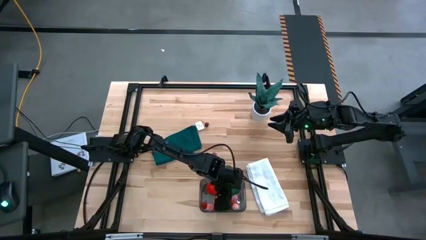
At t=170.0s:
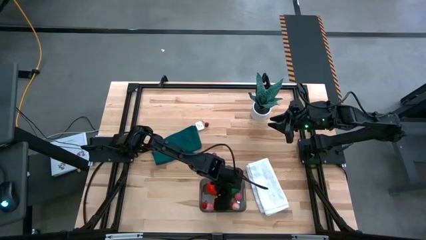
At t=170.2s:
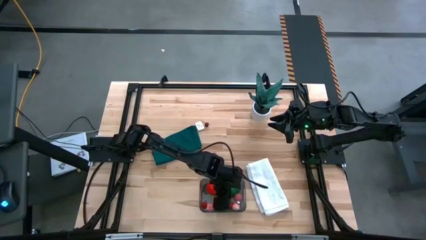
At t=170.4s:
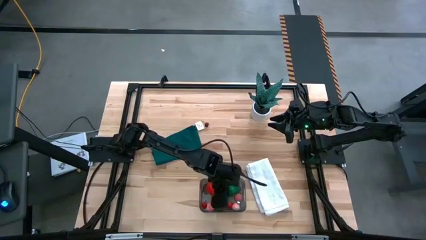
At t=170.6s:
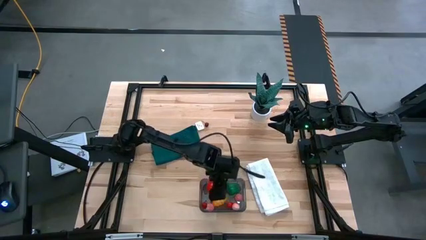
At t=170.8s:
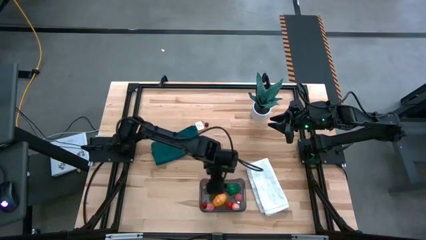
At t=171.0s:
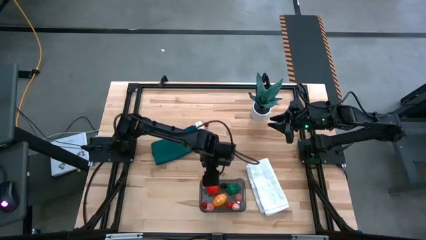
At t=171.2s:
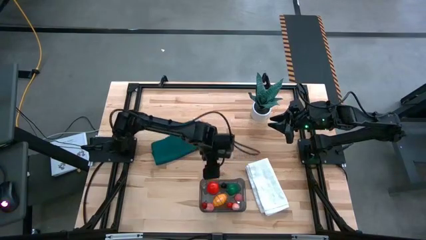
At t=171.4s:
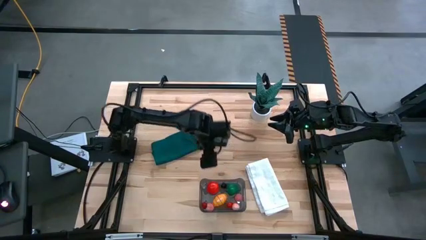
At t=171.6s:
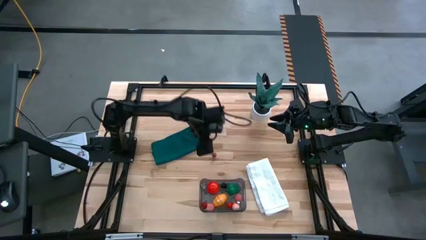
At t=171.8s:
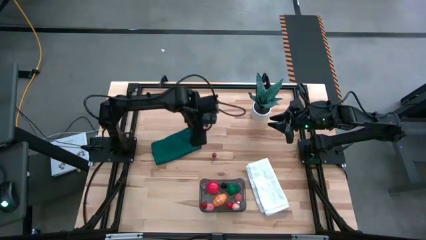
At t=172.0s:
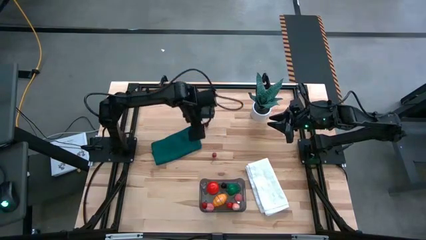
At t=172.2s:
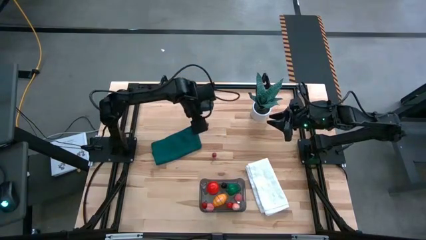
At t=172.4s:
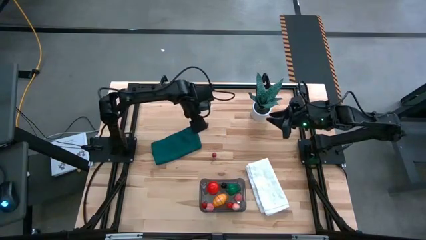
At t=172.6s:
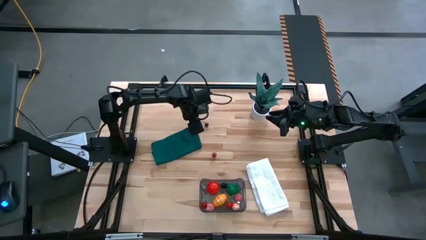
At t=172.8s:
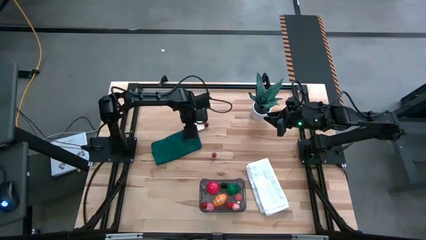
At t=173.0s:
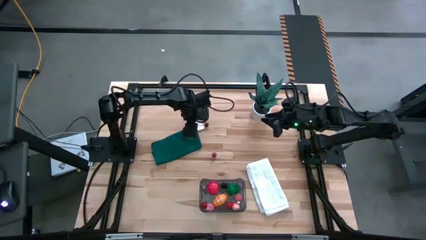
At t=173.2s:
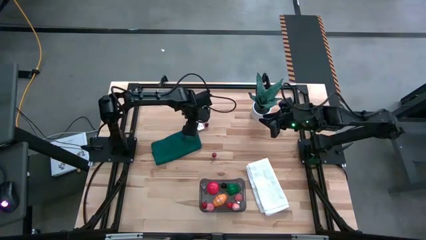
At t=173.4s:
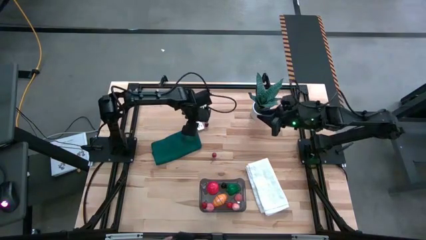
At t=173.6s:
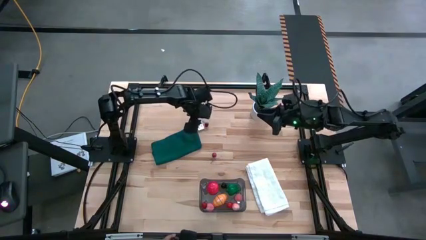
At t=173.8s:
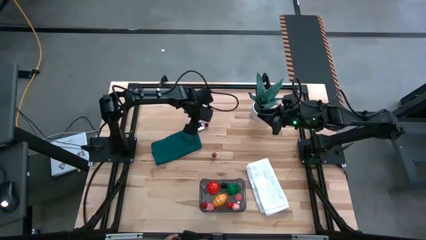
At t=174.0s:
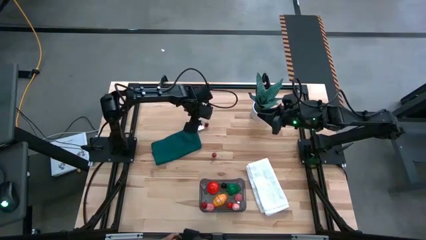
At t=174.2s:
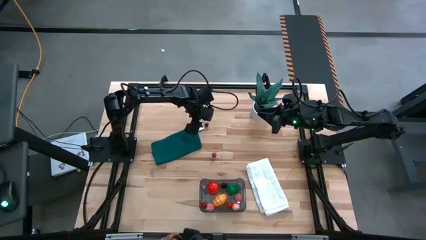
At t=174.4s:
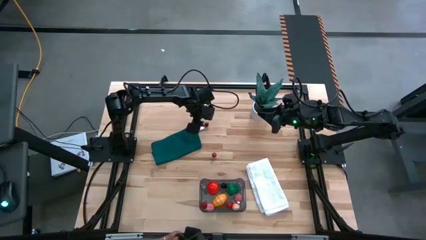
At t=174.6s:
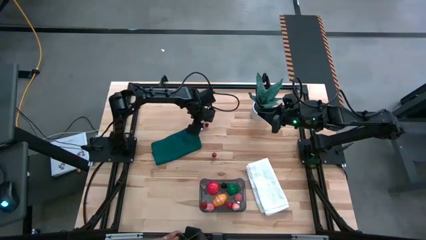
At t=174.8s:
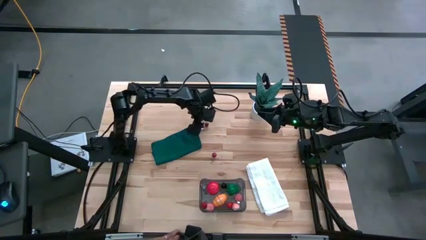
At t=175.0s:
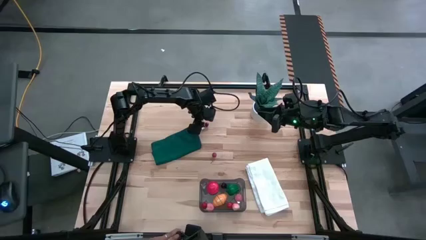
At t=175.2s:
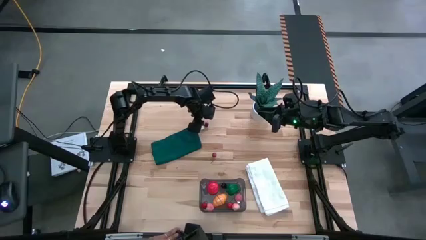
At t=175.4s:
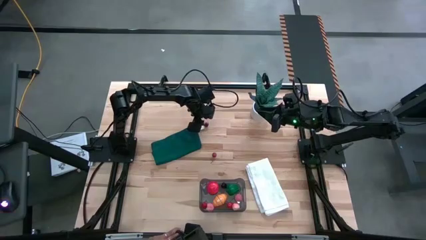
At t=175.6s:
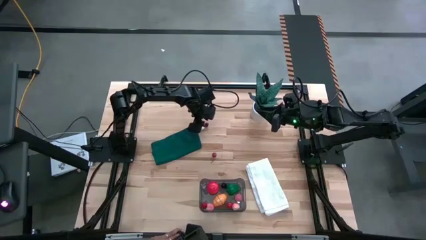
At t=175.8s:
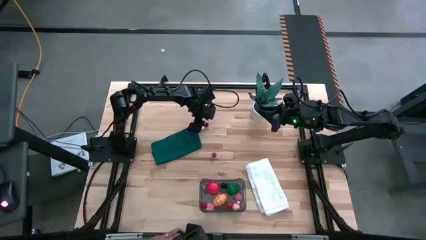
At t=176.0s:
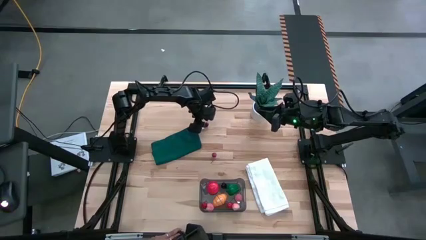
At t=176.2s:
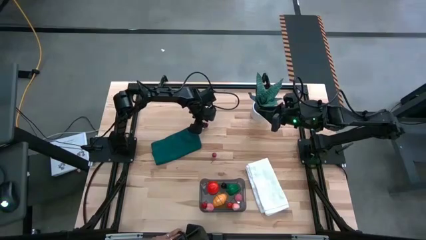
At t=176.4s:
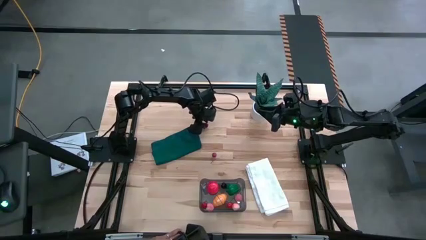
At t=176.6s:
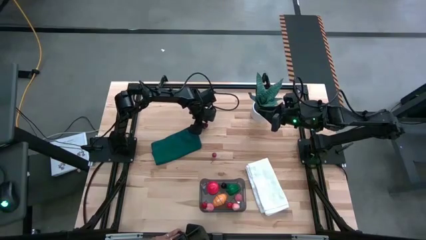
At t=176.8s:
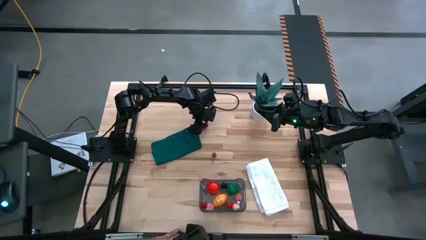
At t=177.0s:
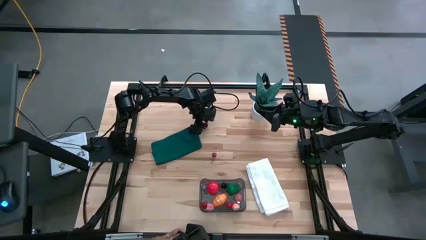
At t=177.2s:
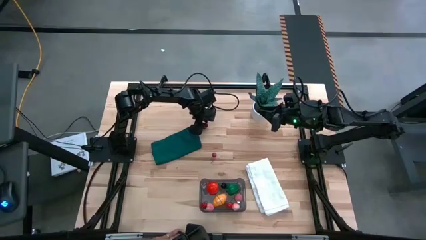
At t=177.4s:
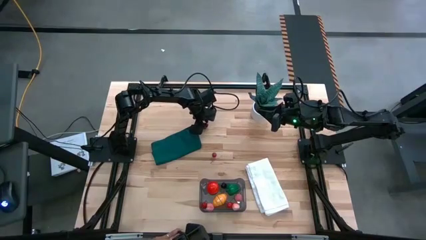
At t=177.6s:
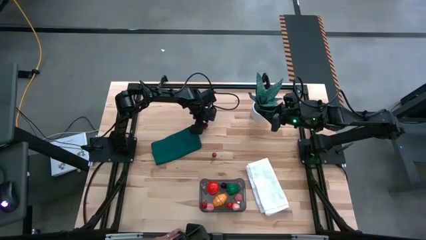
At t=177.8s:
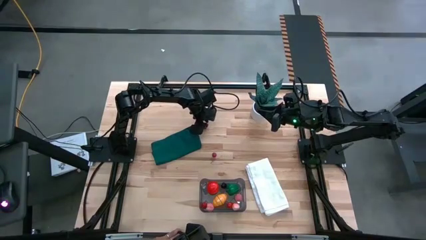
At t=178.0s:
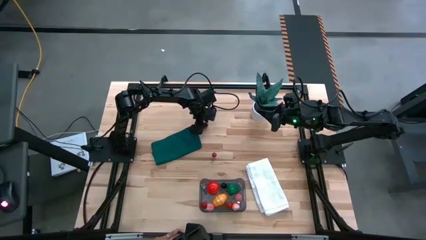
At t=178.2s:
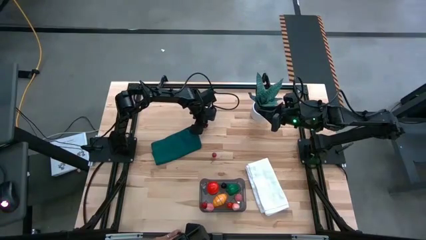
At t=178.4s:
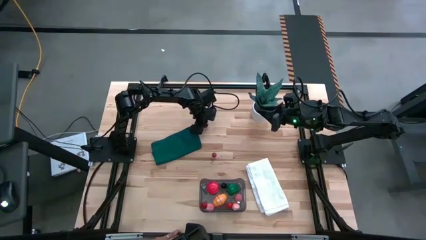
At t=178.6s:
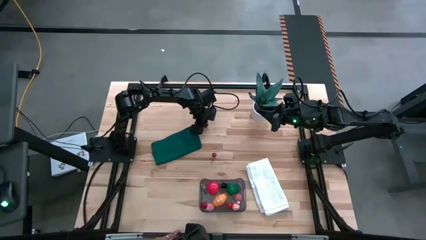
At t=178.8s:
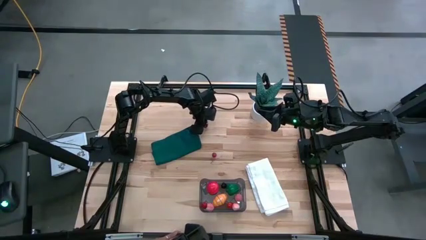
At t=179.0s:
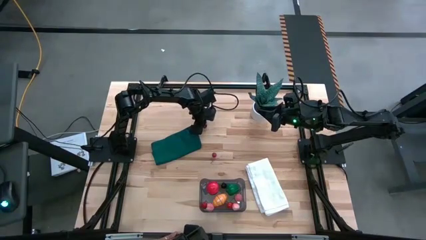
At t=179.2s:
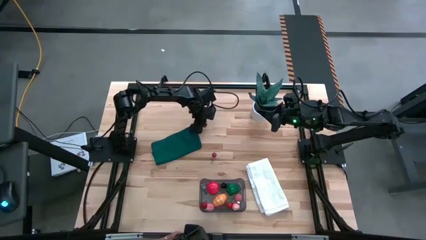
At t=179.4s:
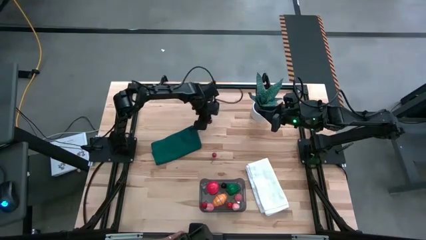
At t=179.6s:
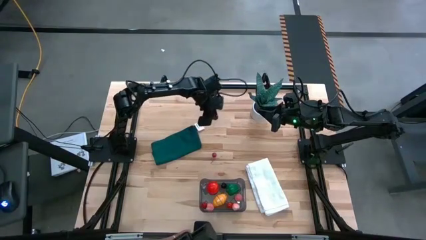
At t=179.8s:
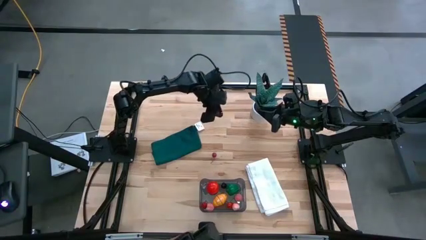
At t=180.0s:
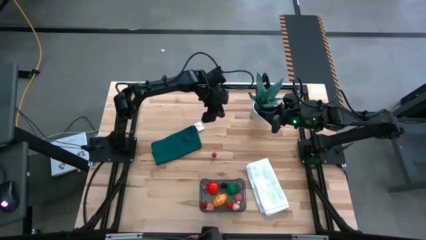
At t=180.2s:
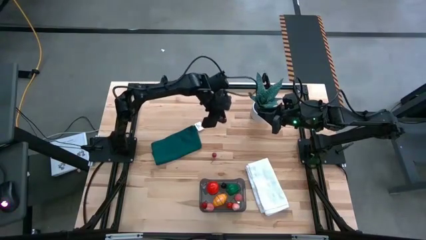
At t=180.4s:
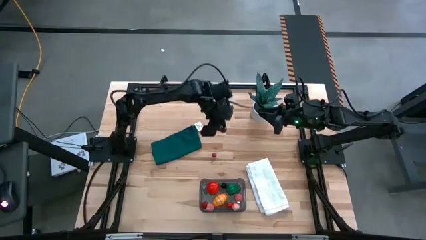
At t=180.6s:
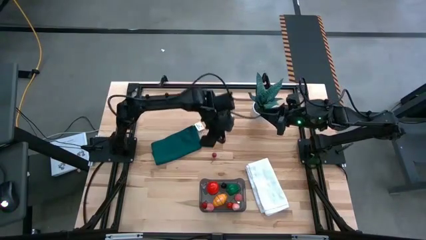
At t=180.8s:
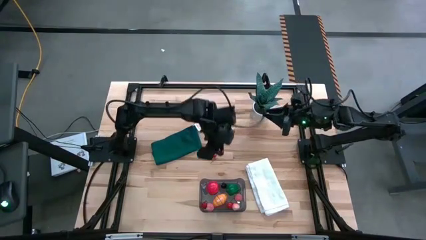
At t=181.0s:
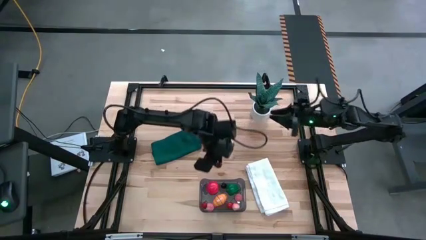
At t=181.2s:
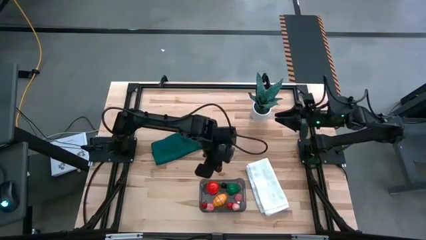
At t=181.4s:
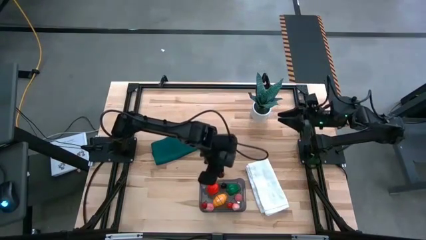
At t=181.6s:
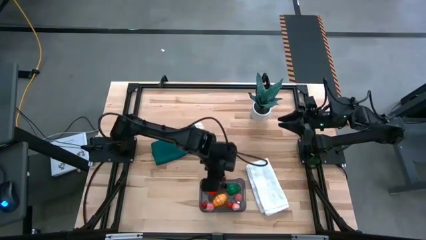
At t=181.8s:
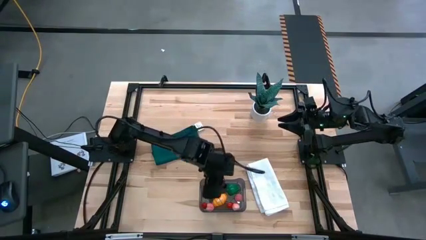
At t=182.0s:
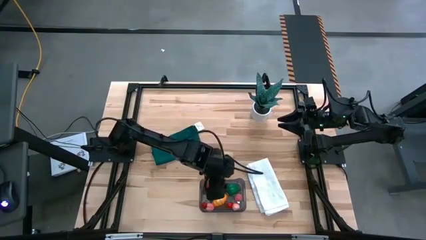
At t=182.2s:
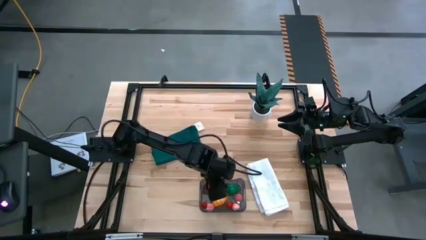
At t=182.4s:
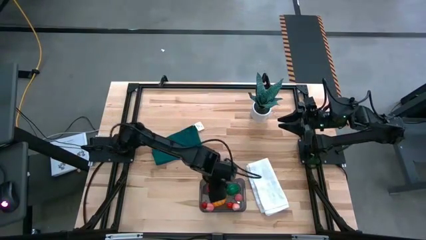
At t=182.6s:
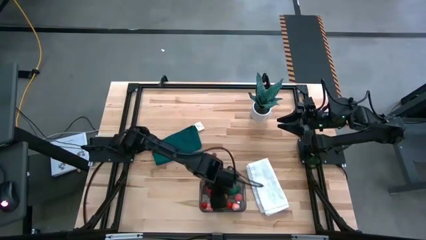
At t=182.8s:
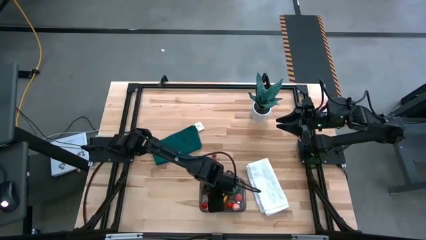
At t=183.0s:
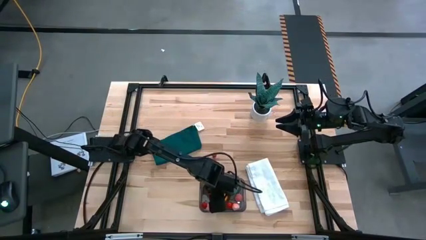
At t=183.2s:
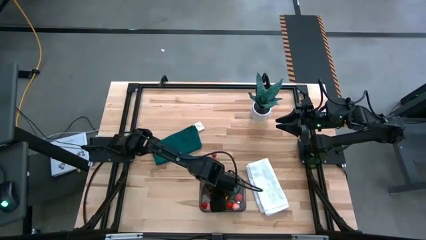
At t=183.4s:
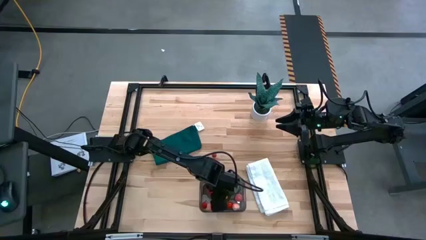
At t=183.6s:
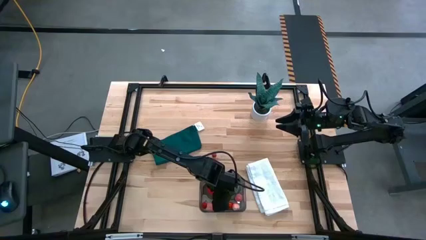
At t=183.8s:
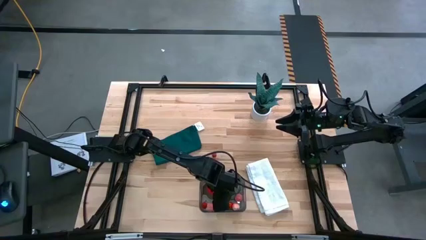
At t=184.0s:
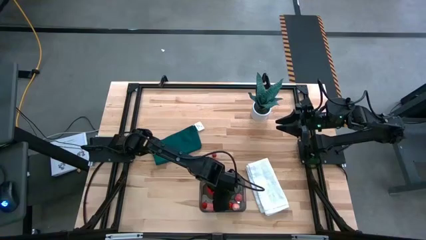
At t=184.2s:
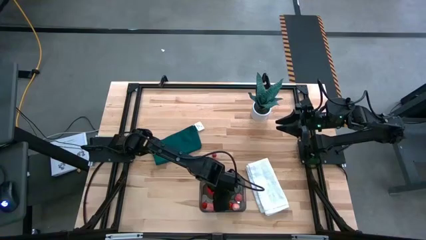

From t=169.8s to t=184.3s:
Task: Pick and placing Produce into tupperware
Put the top red cherry into the black bin
